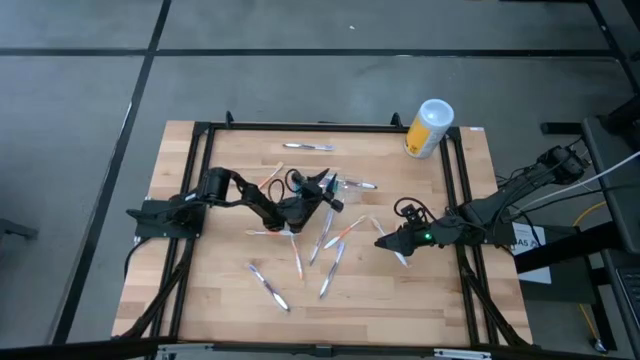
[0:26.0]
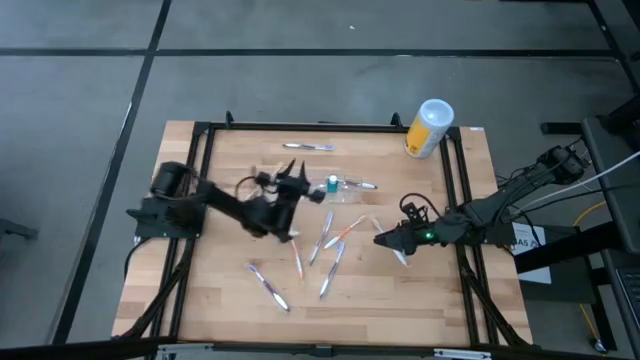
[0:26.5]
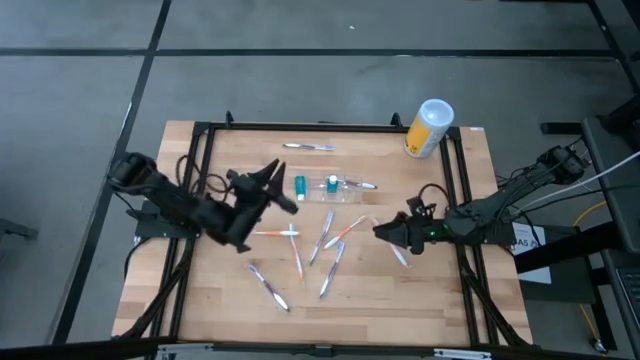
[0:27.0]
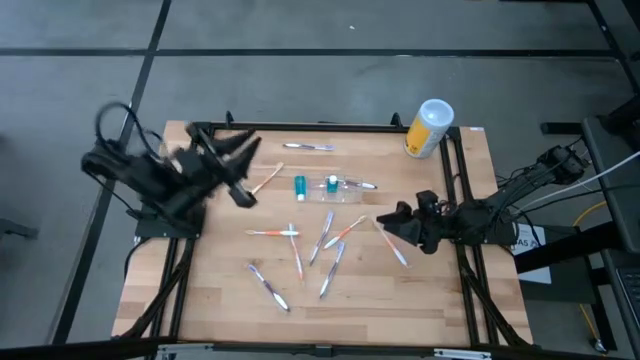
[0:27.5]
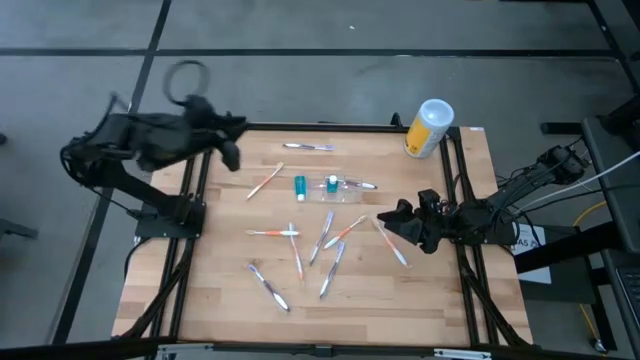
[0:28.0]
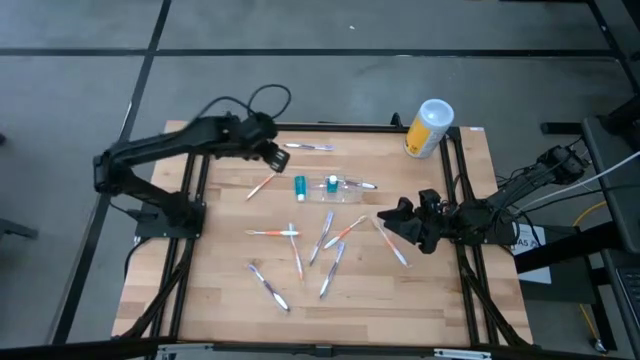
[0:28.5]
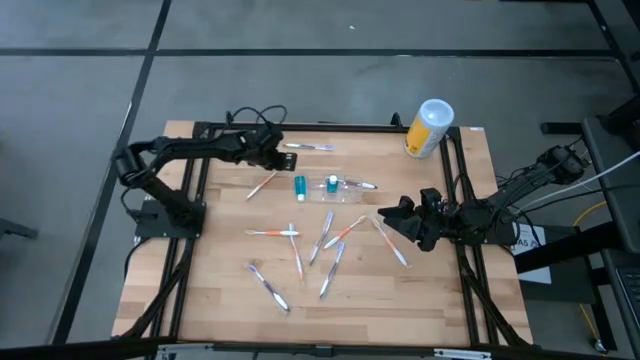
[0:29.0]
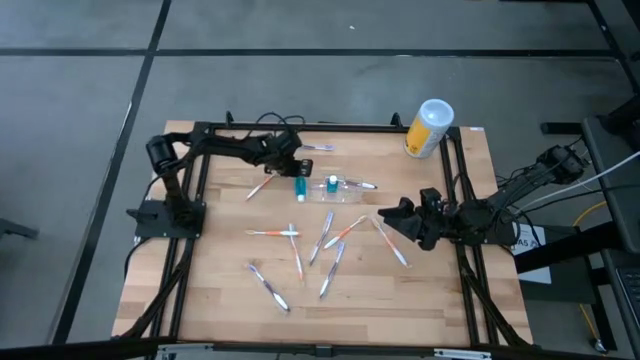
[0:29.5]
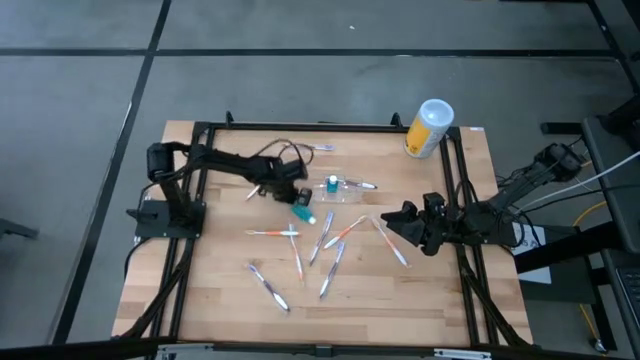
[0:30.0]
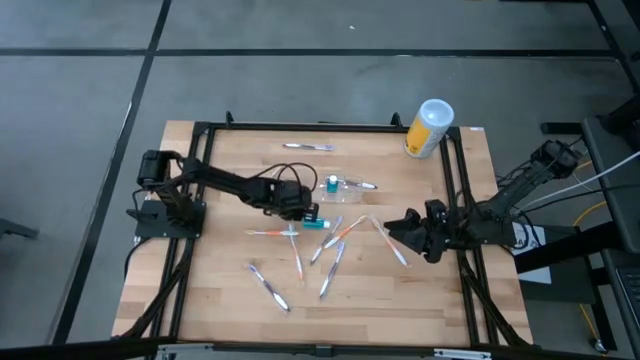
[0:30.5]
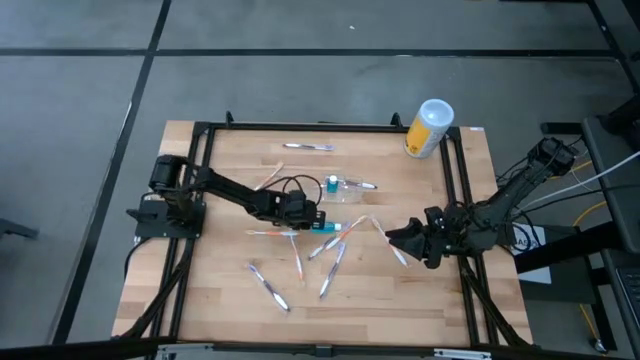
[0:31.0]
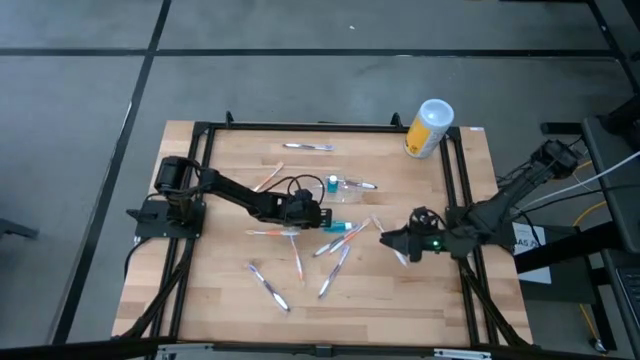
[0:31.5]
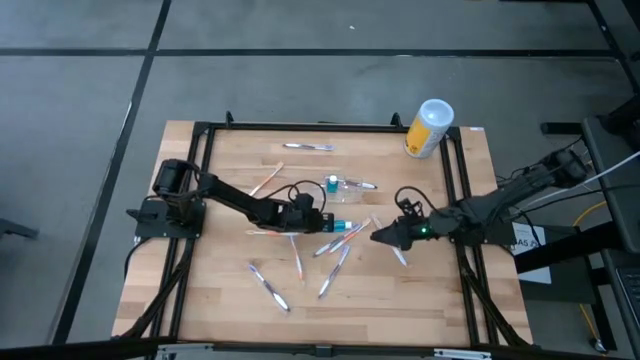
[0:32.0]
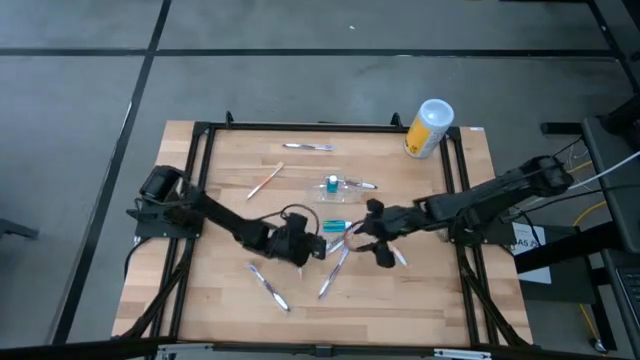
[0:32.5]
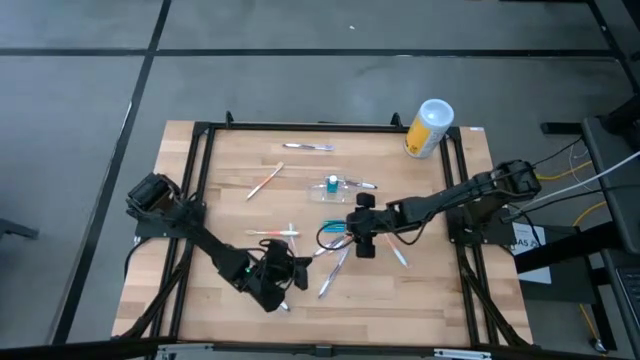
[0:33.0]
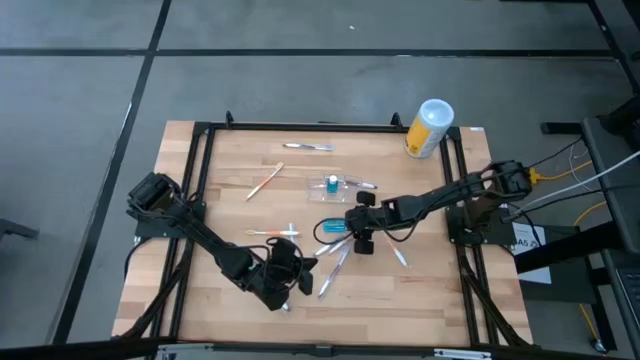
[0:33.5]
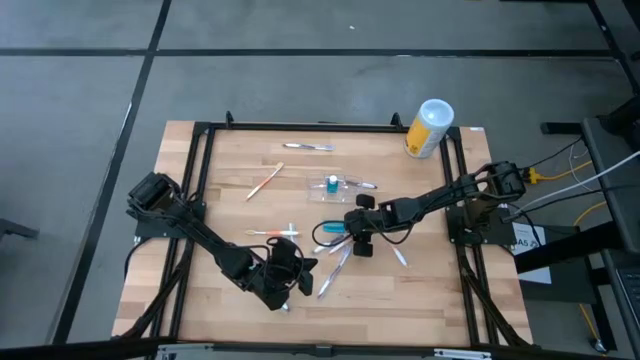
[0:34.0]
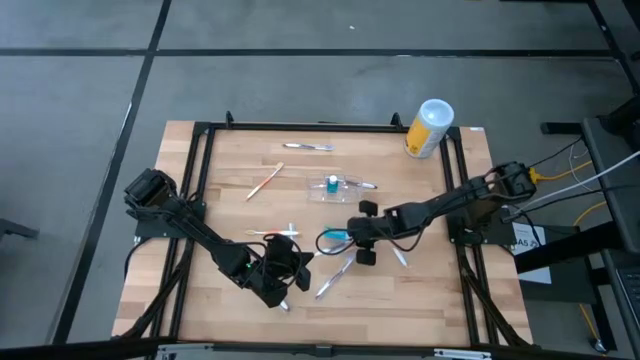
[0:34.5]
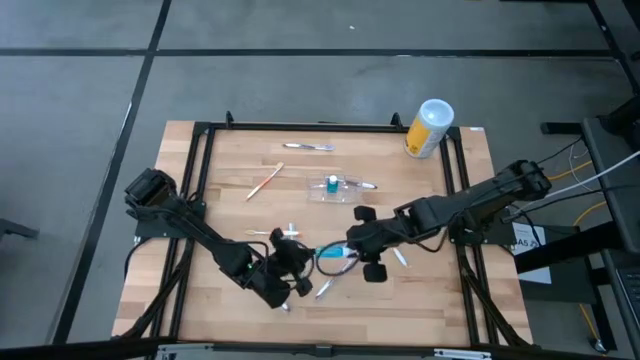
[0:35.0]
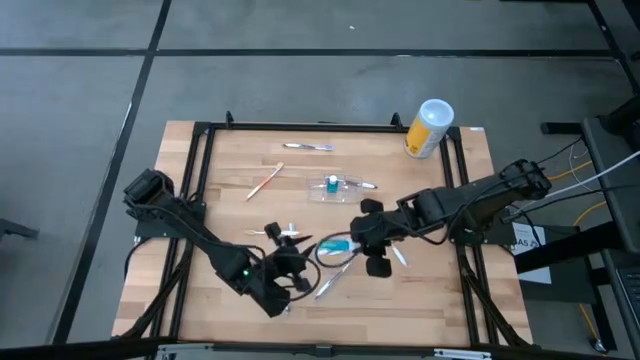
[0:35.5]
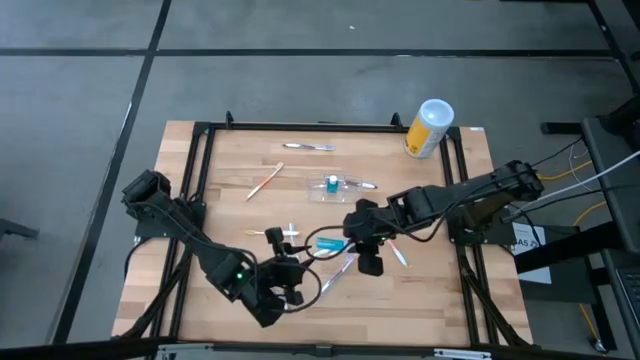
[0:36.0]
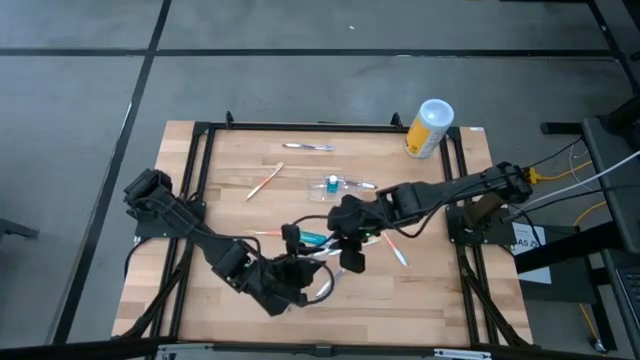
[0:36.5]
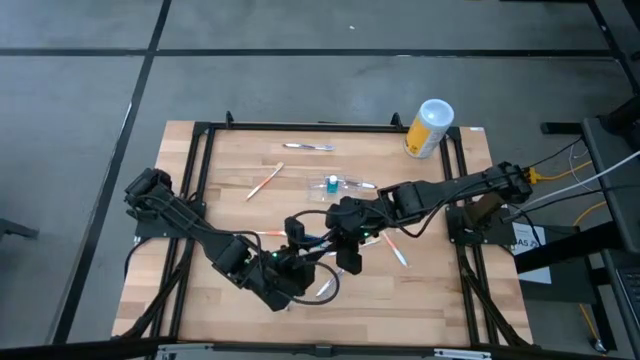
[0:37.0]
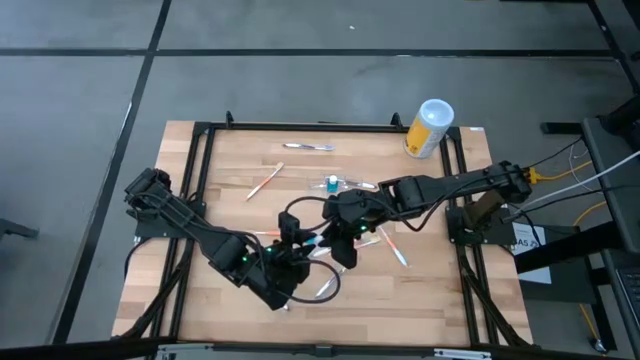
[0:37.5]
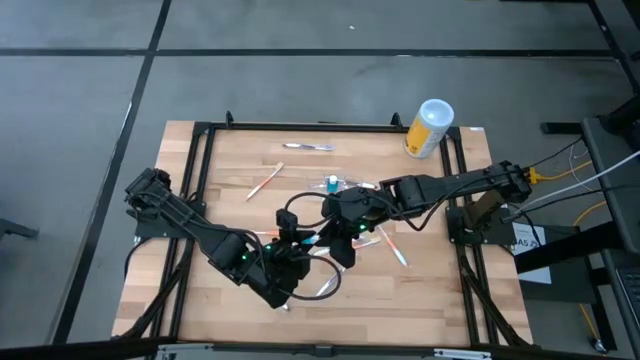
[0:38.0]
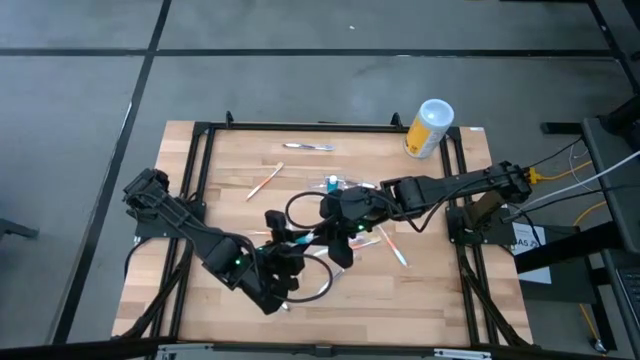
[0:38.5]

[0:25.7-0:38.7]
Task: Pick & Place toothbrushing station
Put the blue mouthwash into the middle section of the transparent organizer

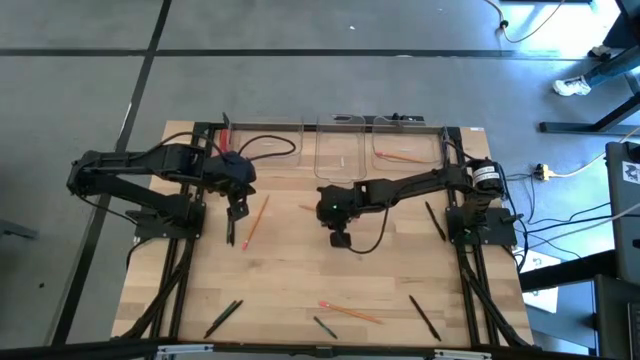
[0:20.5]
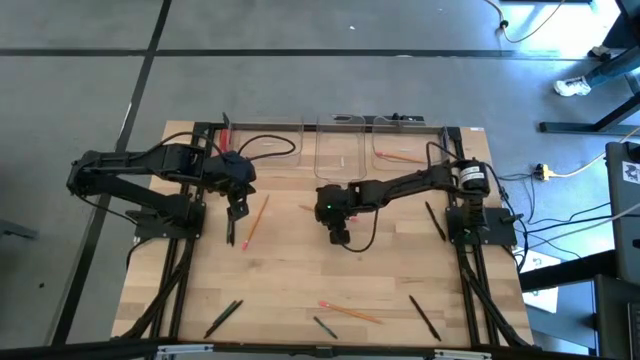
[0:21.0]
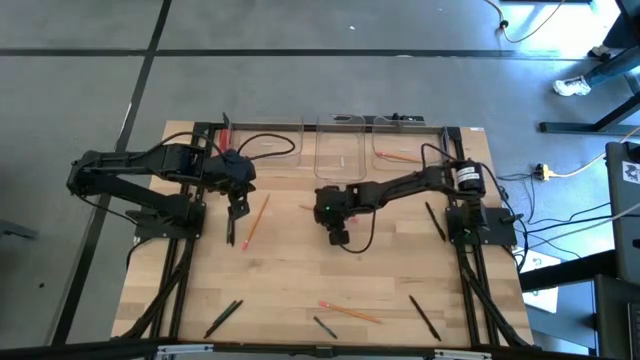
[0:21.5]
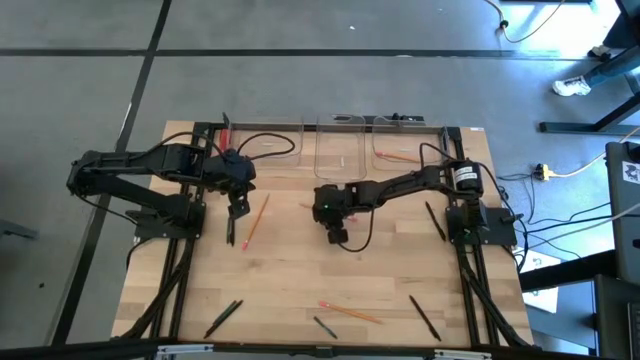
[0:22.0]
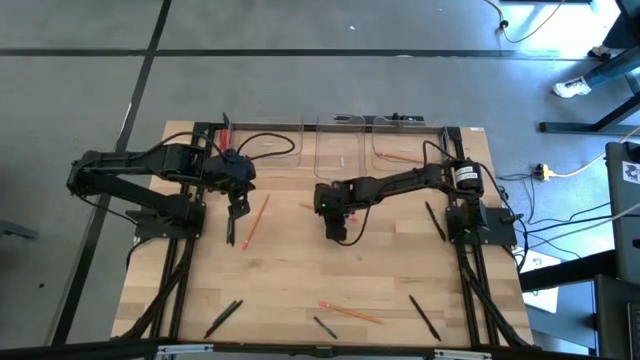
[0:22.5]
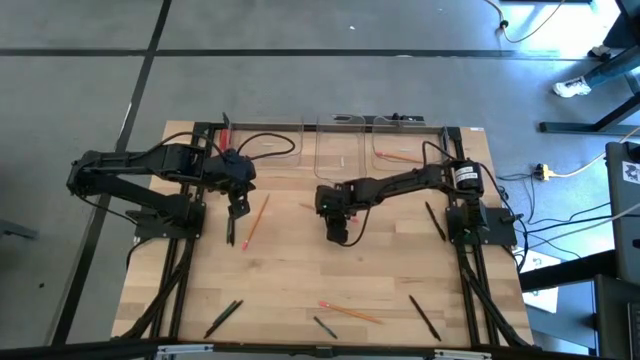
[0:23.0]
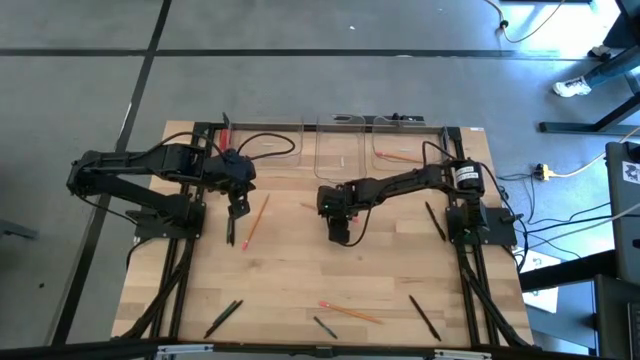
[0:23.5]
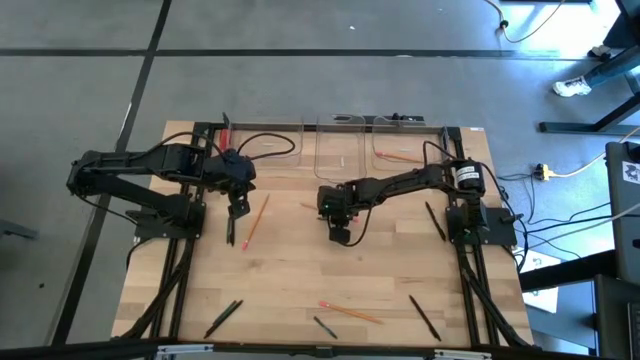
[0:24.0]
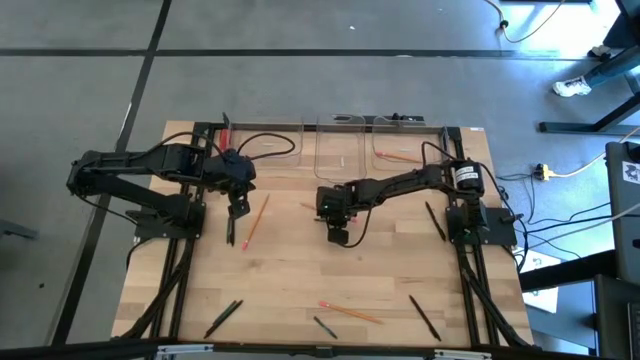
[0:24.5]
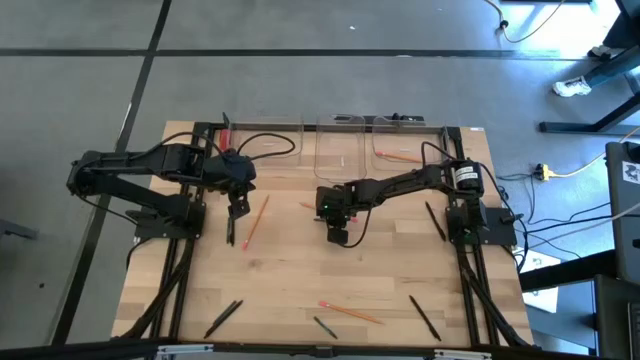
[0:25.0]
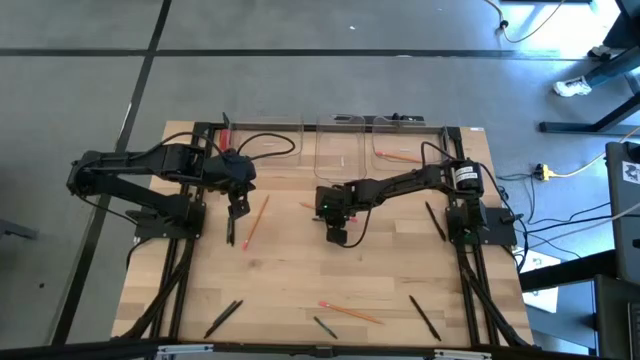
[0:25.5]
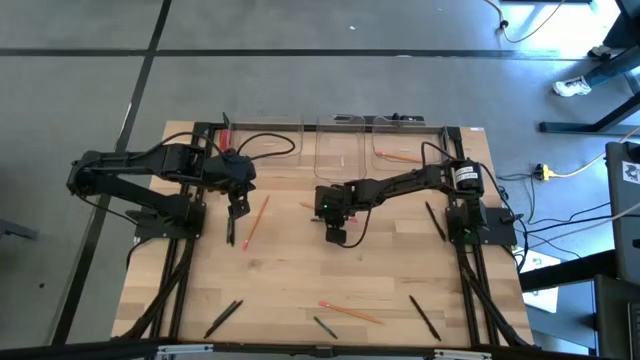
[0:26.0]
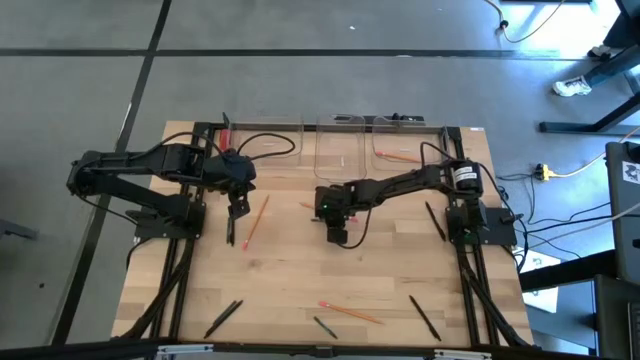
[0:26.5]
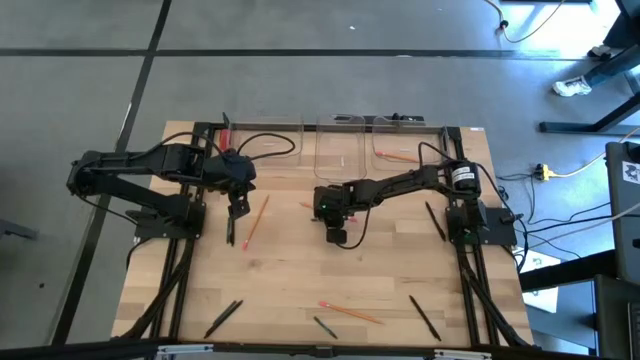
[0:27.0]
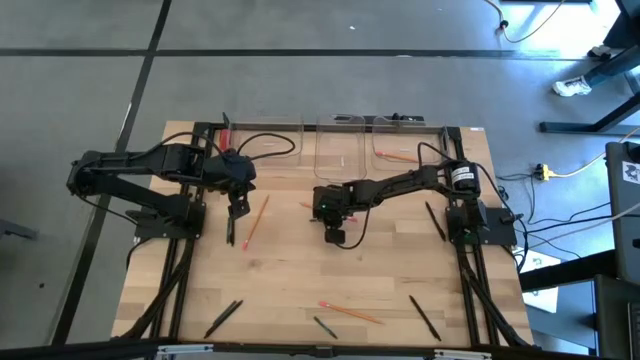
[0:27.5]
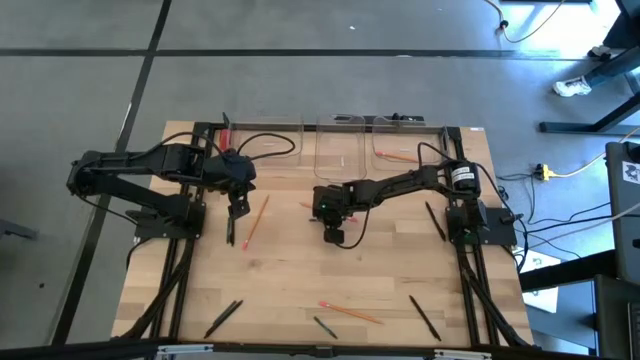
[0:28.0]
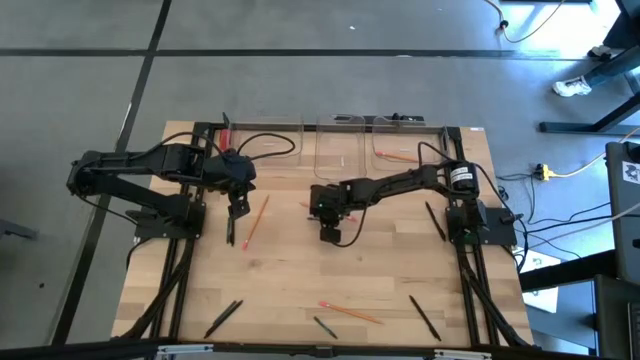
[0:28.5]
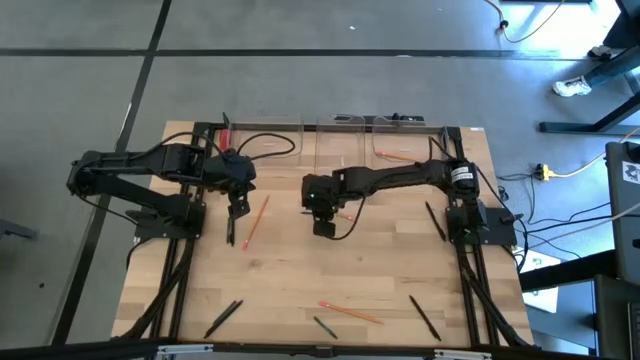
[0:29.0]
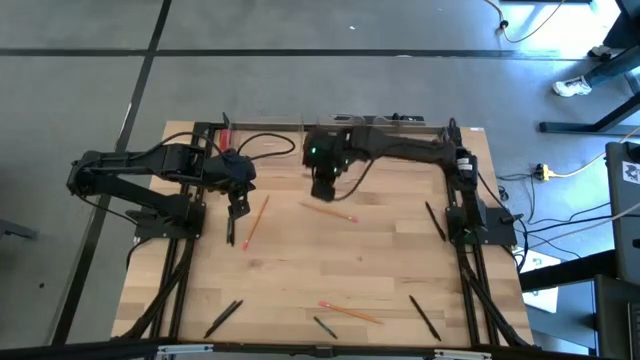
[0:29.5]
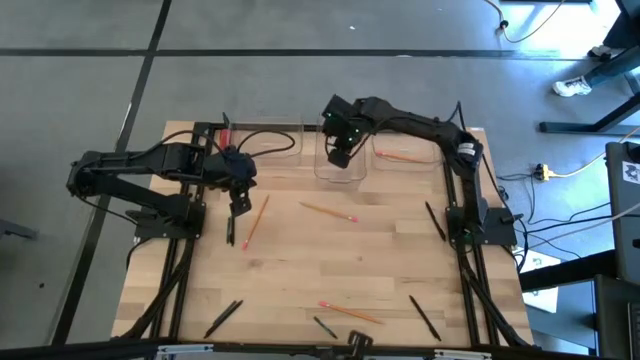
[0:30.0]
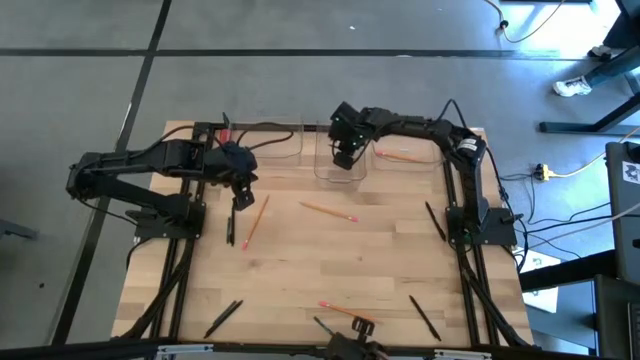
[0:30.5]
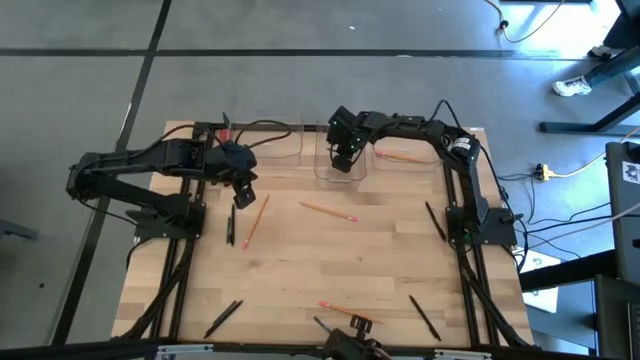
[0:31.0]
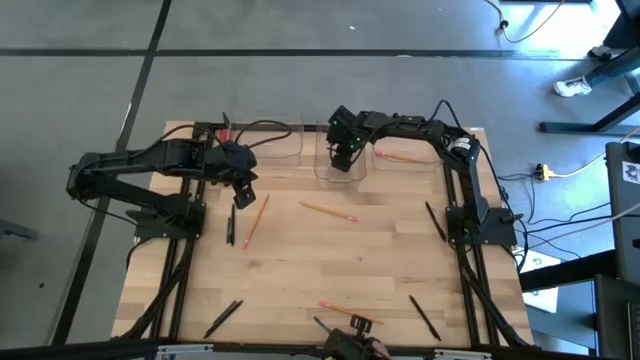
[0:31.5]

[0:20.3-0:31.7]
Task: Sort crayons/erasers/pens/pencils in bins
Put the green crayon into the middle transparent bin
